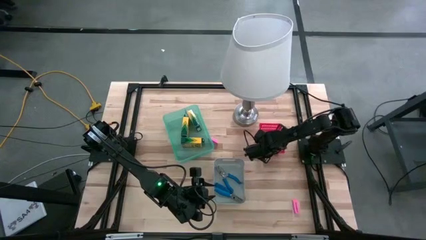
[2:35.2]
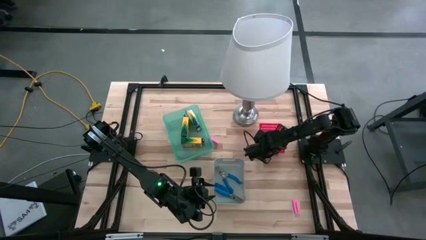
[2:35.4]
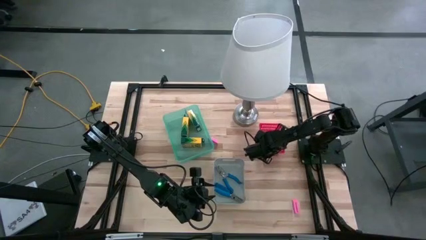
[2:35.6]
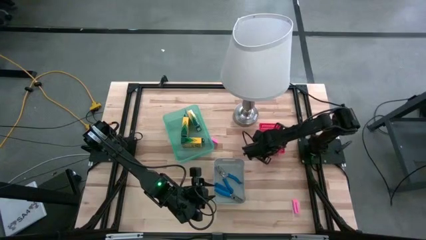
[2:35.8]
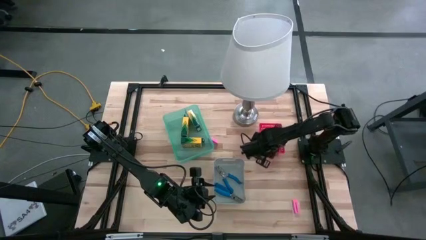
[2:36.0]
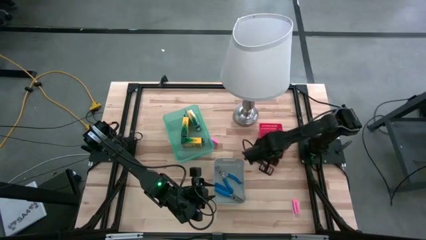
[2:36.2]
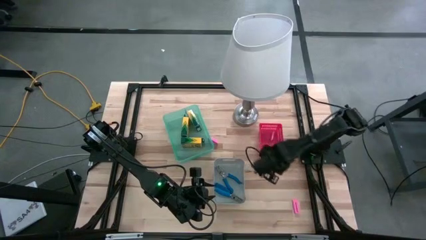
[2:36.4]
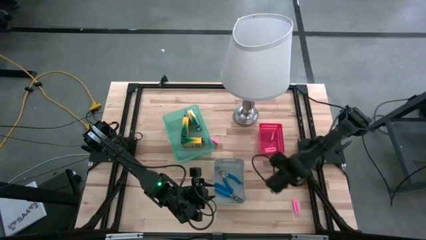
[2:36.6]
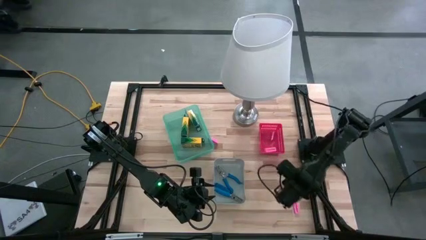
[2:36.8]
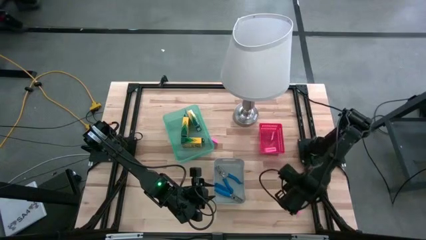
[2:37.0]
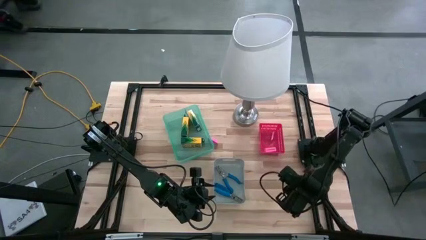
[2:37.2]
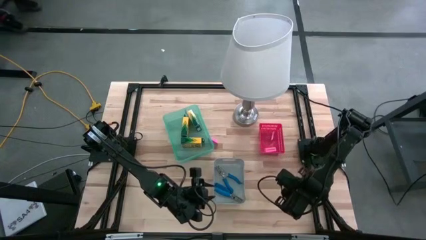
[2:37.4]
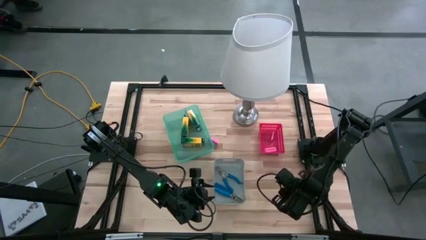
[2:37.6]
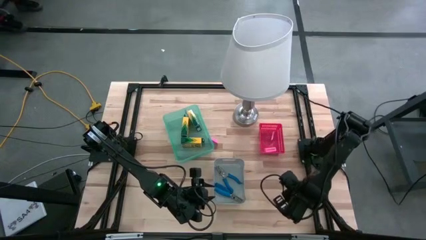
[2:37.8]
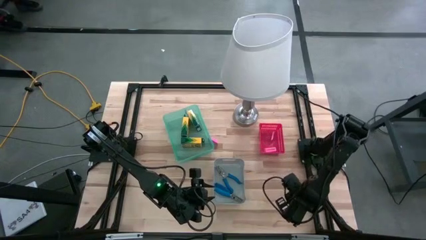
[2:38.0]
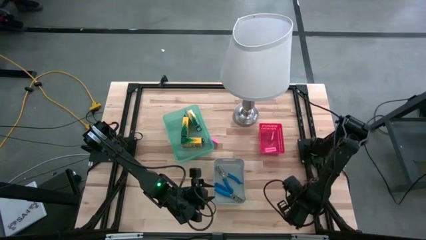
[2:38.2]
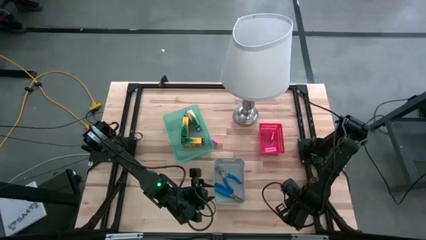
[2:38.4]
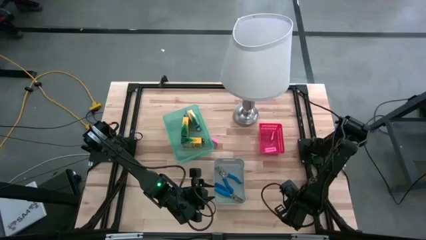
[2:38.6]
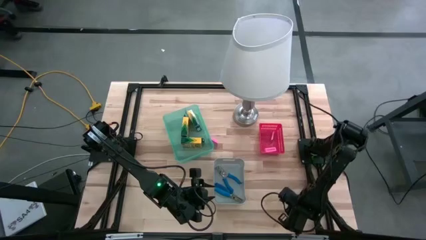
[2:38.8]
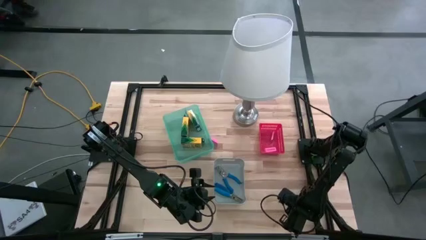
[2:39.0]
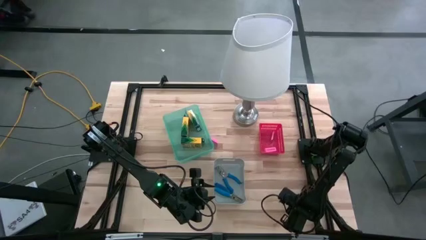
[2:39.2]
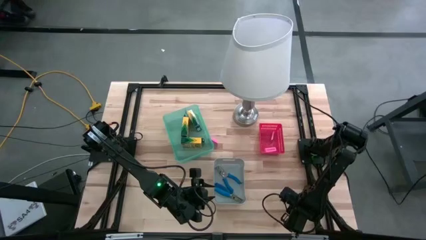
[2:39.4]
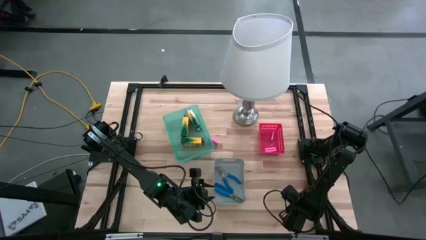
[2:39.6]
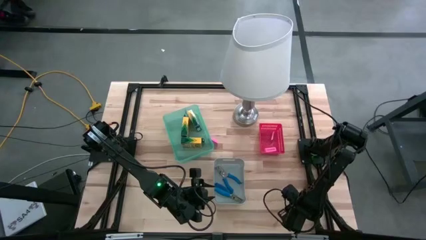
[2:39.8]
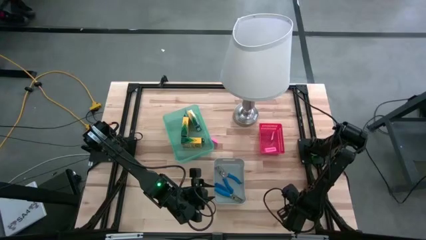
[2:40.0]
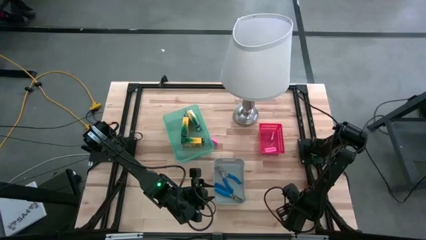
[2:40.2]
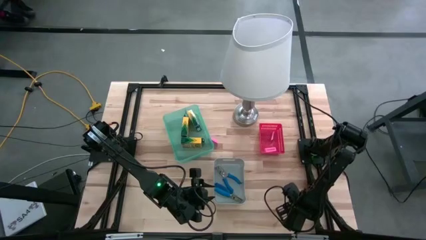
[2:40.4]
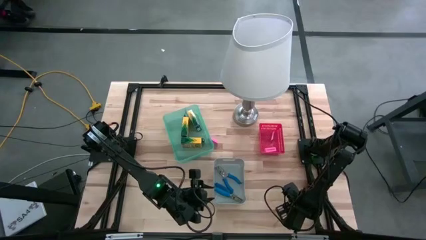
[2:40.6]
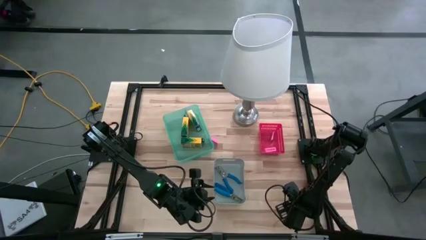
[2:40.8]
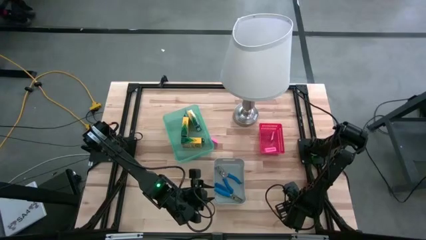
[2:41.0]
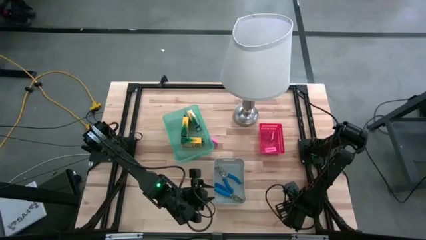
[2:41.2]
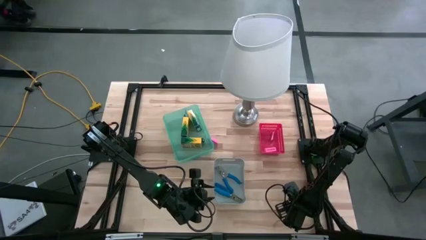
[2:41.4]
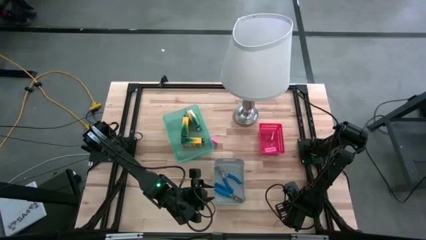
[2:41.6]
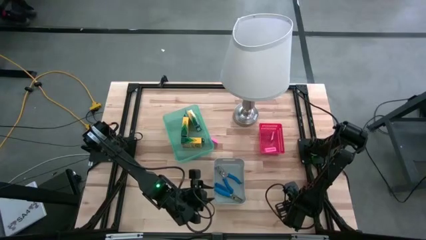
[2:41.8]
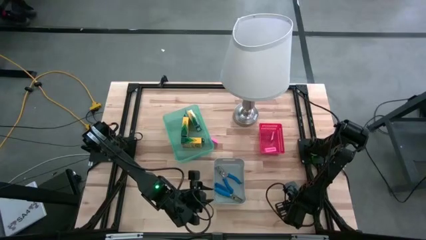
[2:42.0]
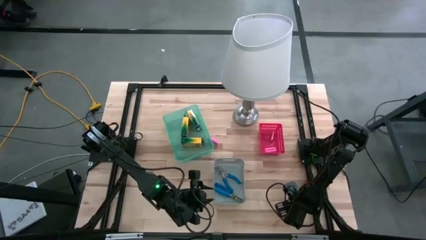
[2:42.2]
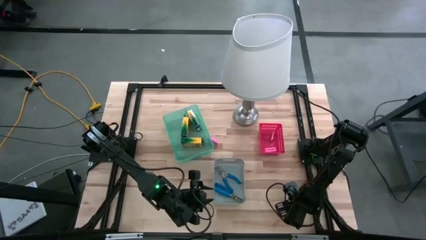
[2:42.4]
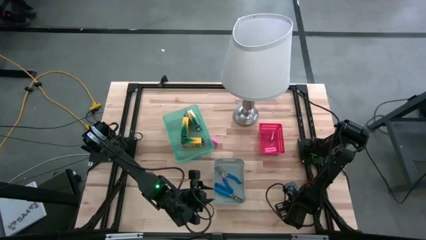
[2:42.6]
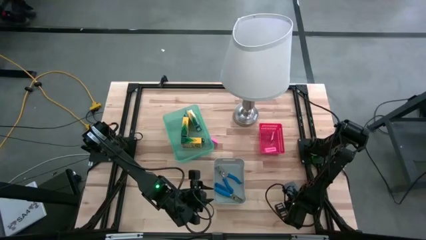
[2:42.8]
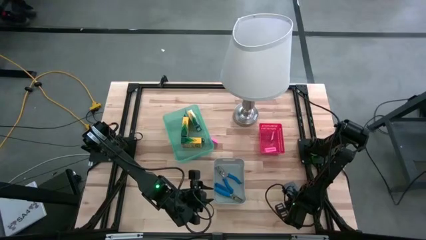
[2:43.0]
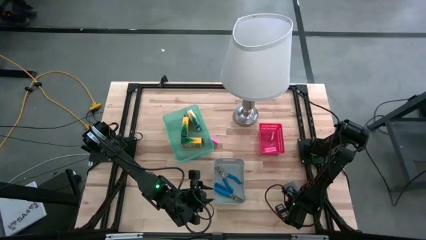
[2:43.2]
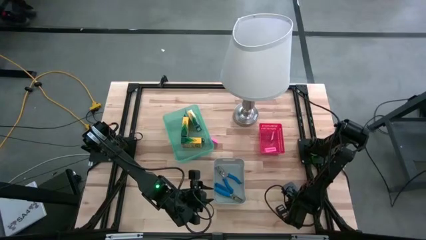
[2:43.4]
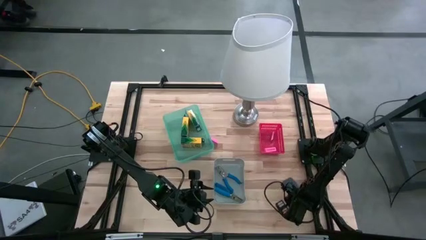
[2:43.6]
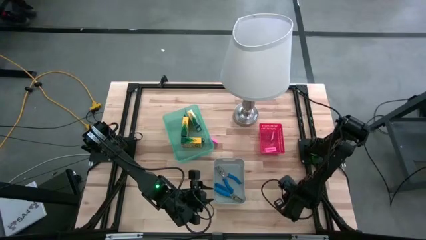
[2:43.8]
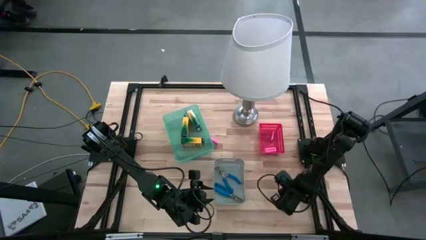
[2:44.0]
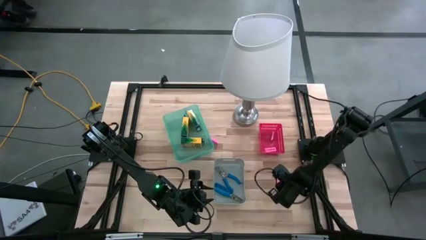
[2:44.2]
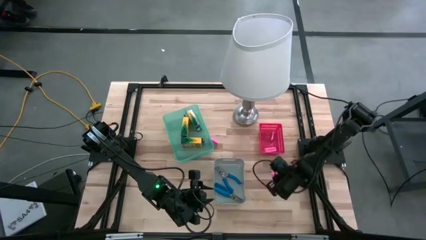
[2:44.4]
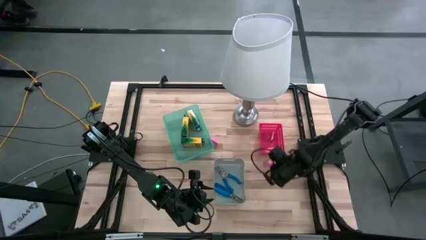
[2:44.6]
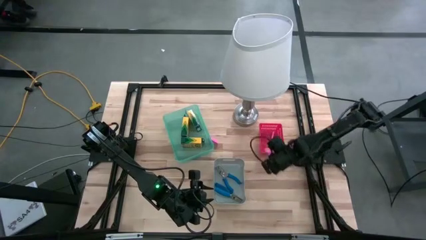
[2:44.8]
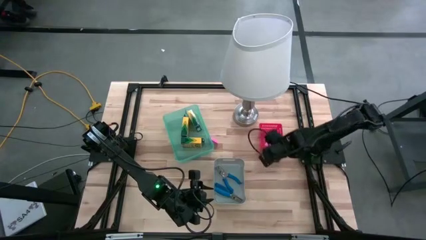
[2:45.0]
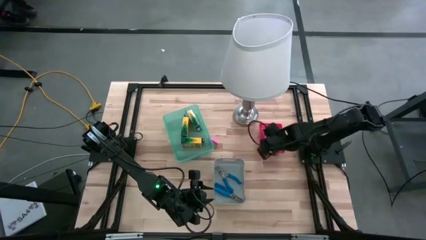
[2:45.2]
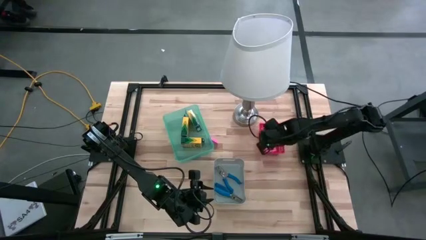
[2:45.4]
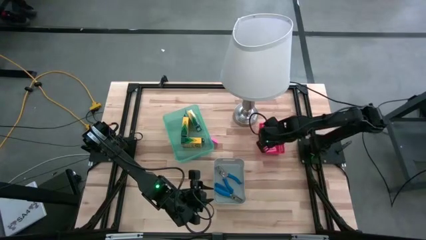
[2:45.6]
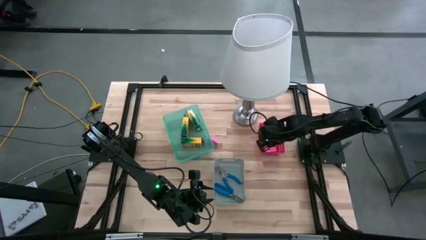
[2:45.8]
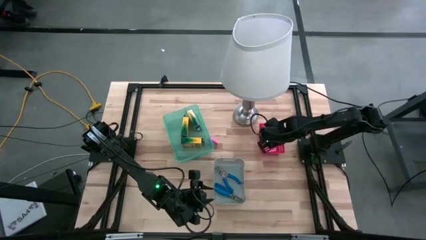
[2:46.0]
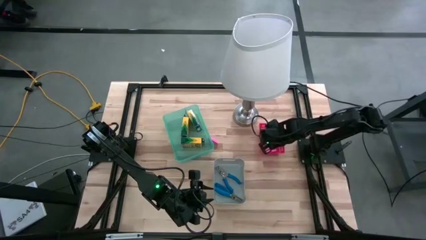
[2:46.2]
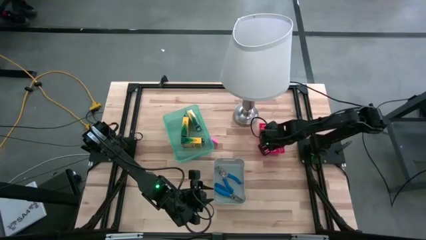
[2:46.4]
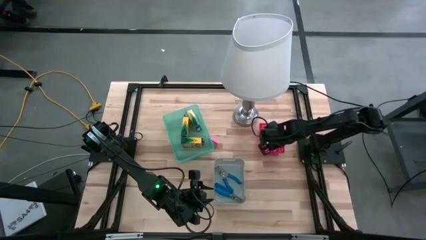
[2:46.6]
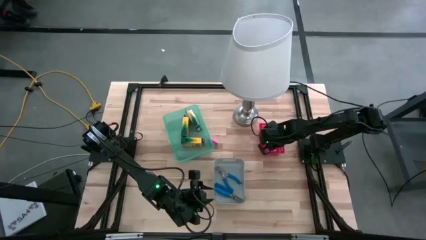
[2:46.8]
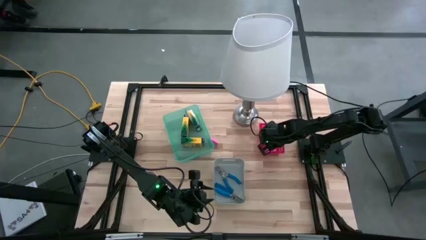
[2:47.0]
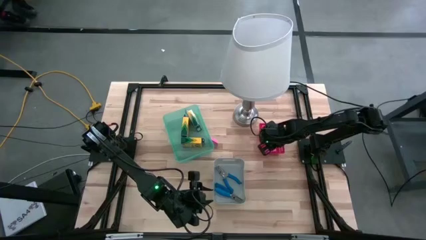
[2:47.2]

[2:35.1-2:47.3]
Task: Pick & Place School Supplies
Put the pink eraser into the red bin

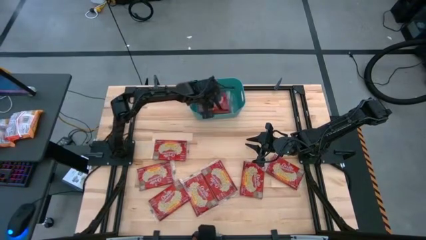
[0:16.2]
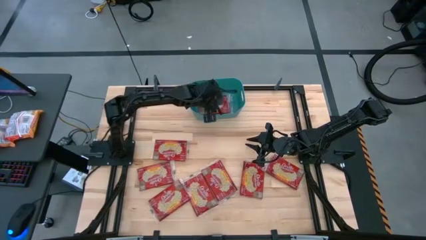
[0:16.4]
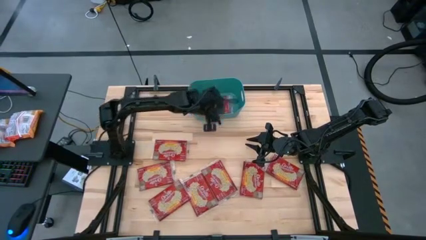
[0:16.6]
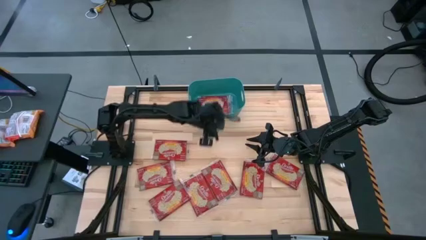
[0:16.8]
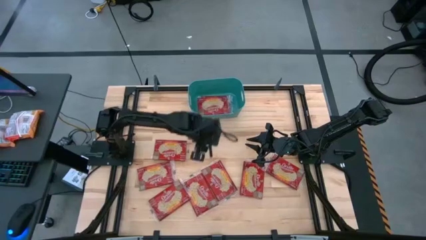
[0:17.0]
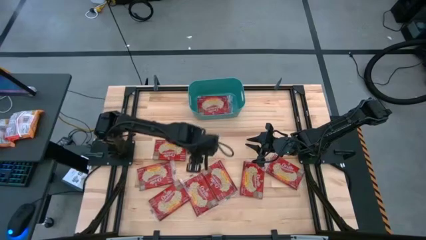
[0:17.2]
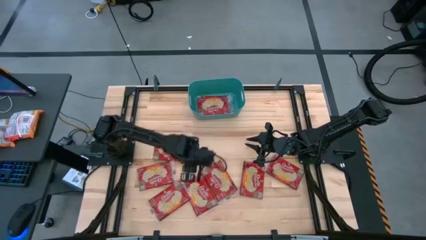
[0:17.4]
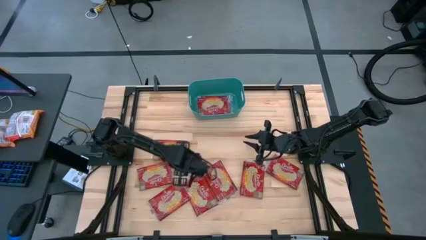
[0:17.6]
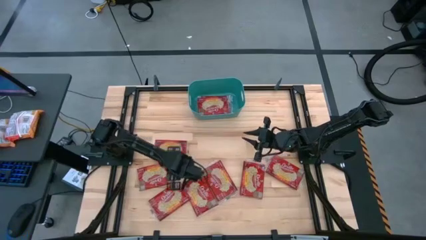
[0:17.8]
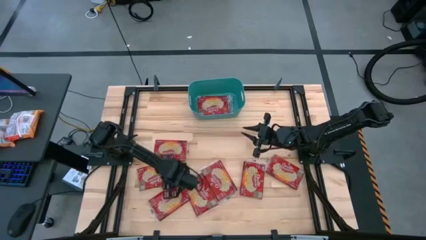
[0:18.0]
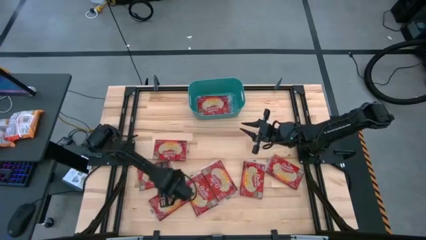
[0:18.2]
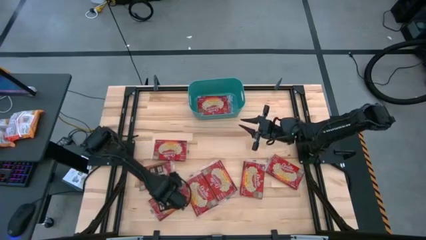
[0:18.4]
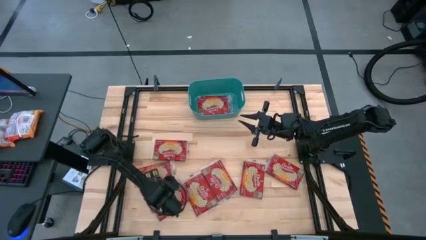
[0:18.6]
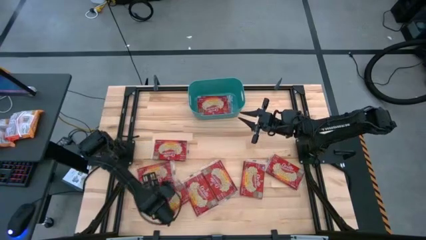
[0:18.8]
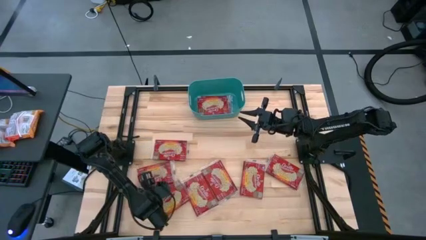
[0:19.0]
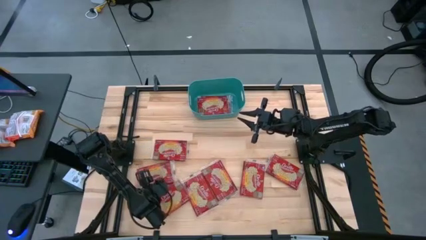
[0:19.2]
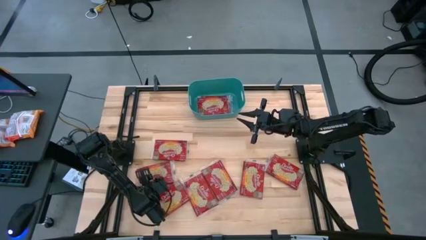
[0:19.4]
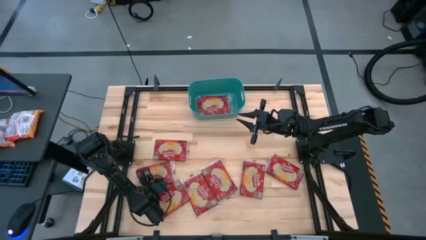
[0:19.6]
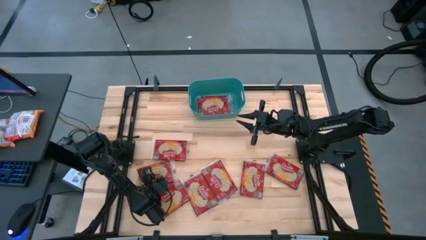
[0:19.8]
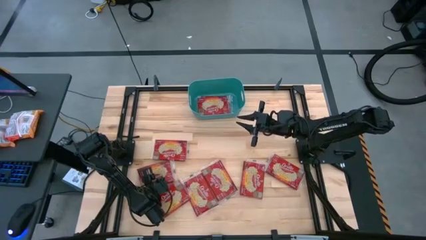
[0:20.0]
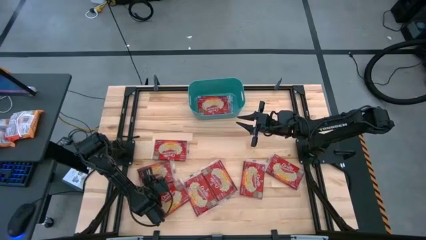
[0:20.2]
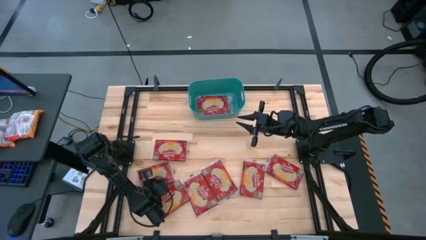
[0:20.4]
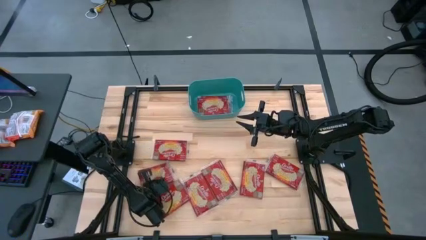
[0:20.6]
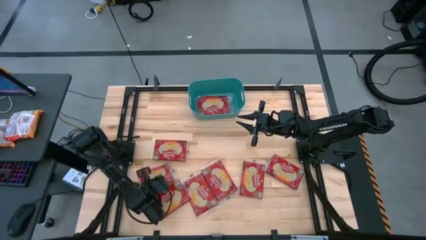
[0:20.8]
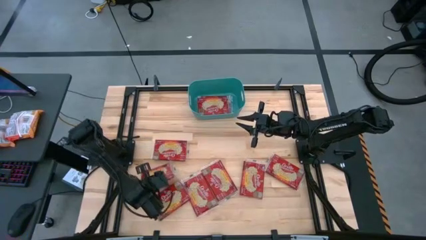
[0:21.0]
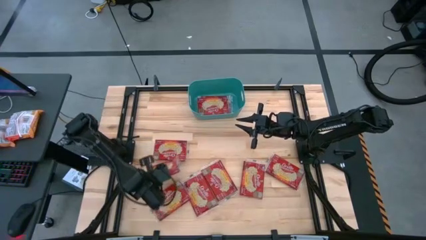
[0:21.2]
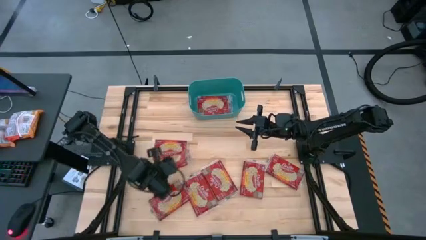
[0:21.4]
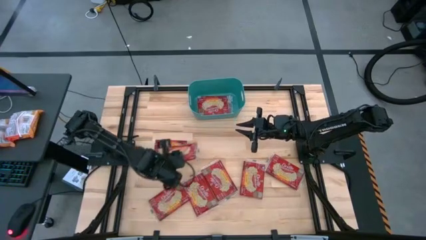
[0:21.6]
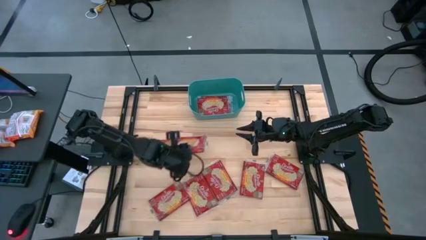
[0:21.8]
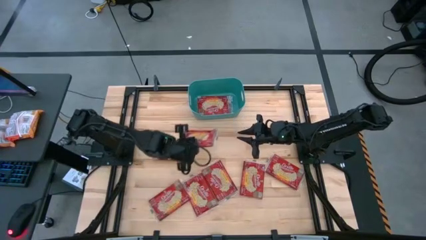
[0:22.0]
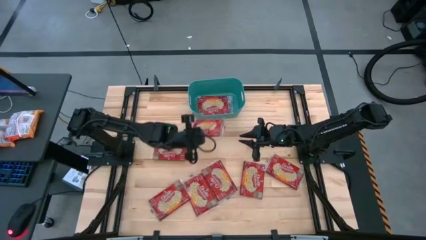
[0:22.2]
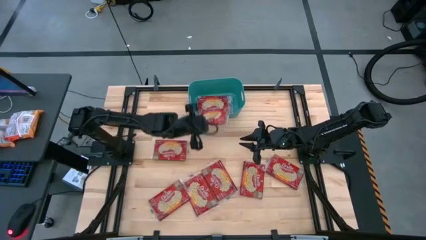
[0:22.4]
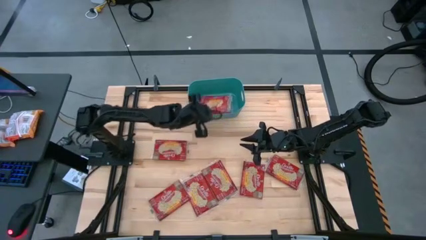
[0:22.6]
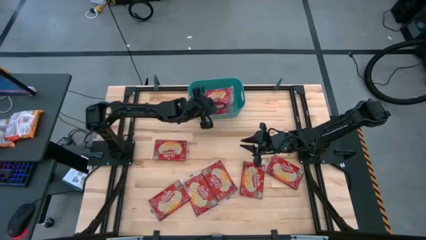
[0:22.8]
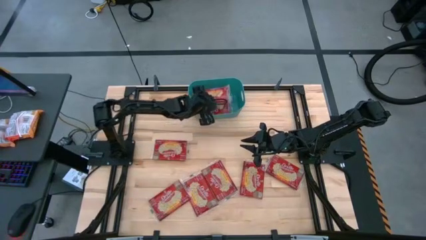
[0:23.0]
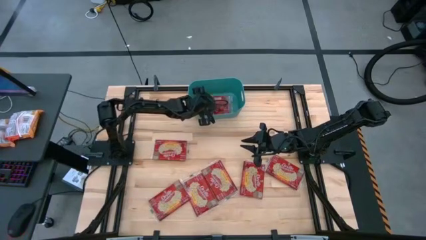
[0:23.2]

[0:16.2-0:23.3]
Task: Sort popcorn bags into baskets
Put the red popcorn bag into the bin
